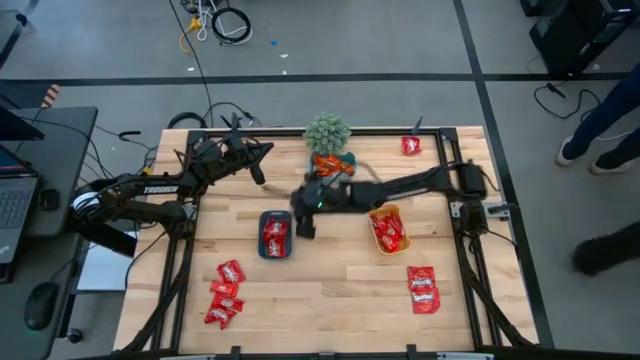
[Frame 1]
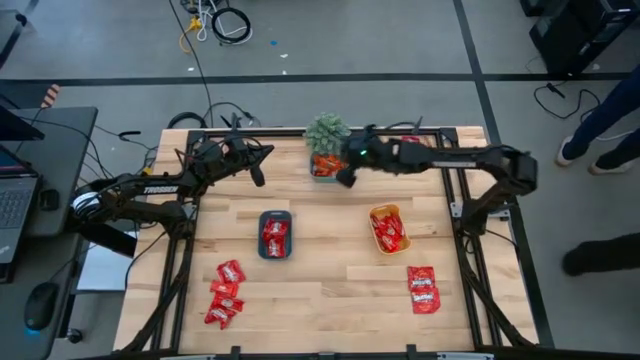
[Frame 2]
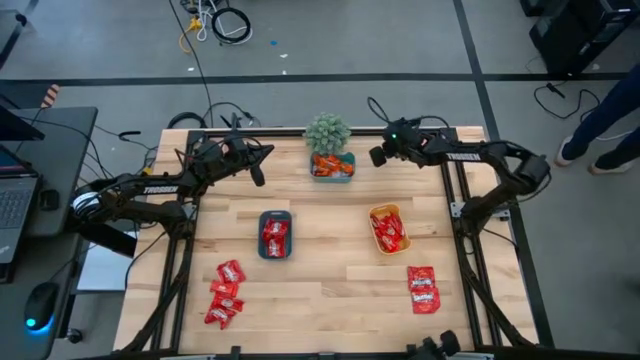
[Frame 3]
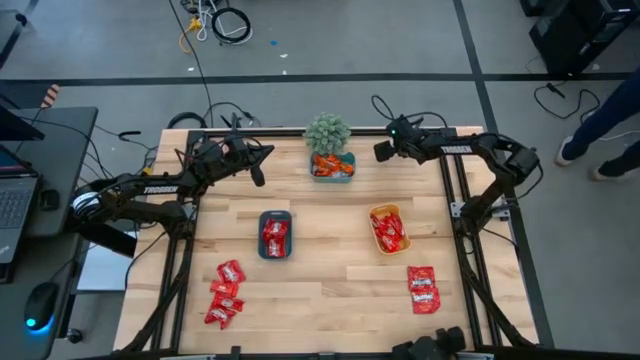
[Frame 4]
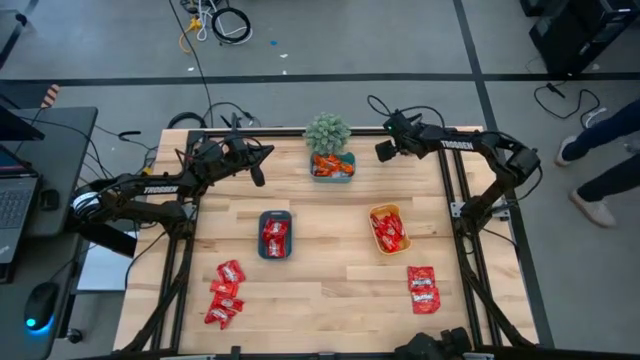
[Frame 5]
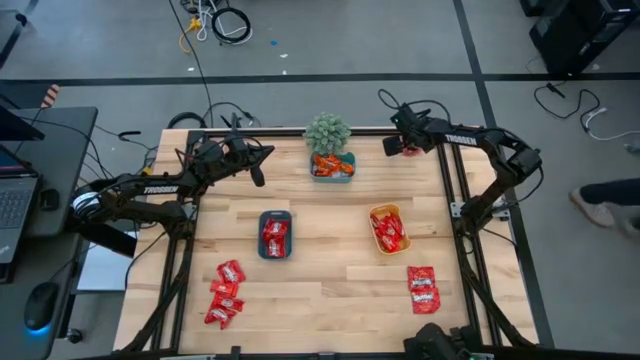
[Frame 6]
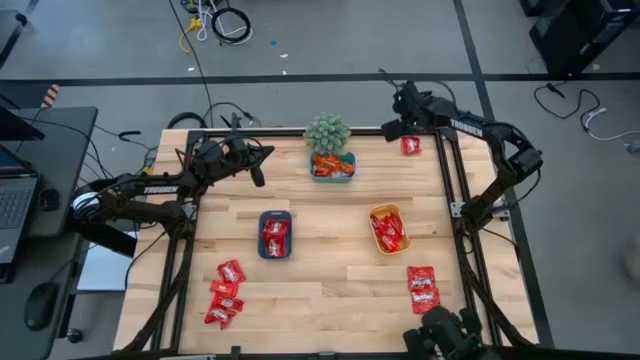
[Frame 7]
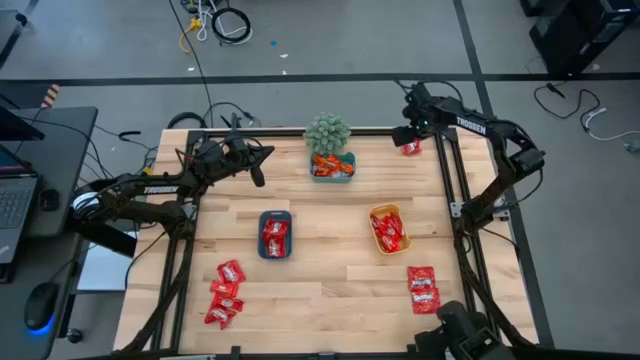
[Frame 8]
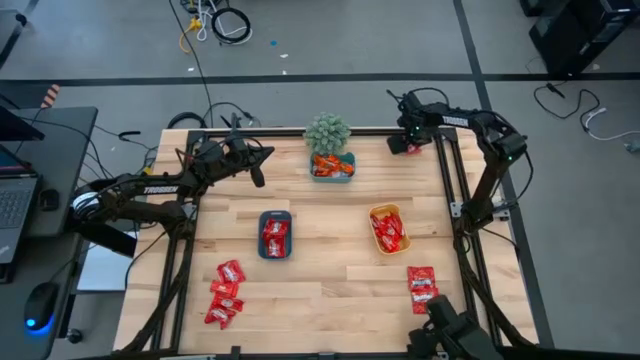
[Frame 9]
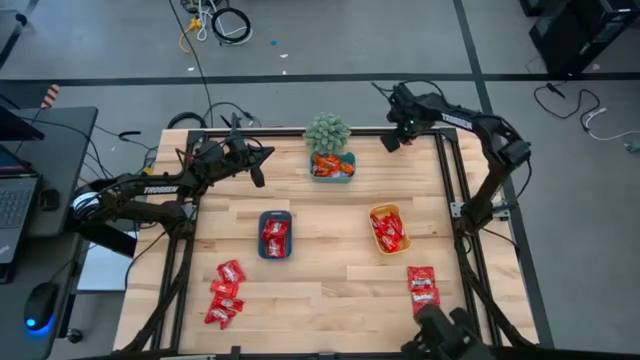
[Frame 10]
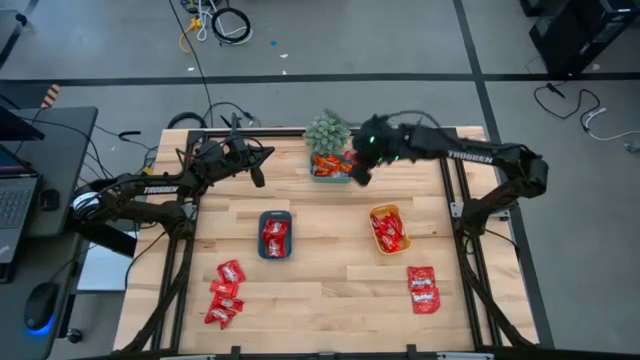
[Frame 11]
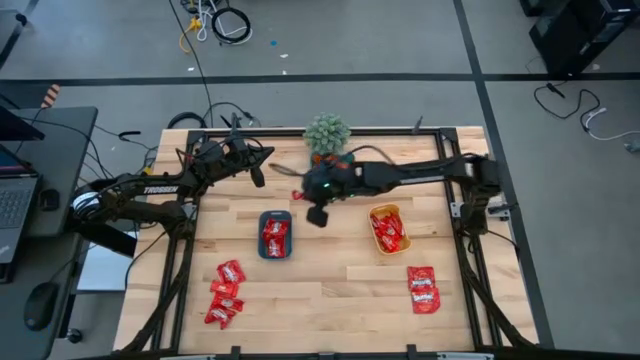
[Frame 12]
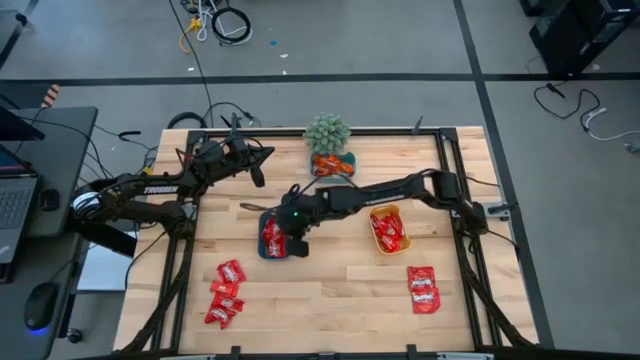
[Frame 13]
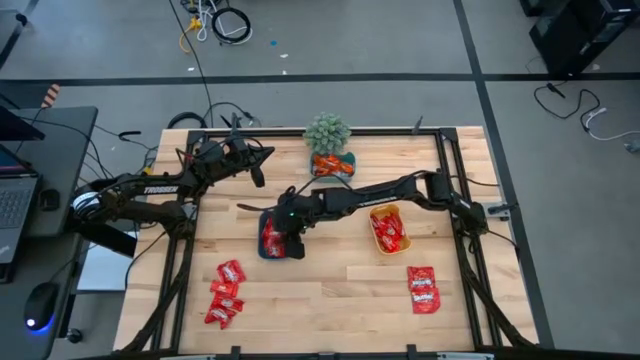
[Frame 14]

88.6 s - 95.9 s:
Task: Sort candy
Put the red candy into the blue bin

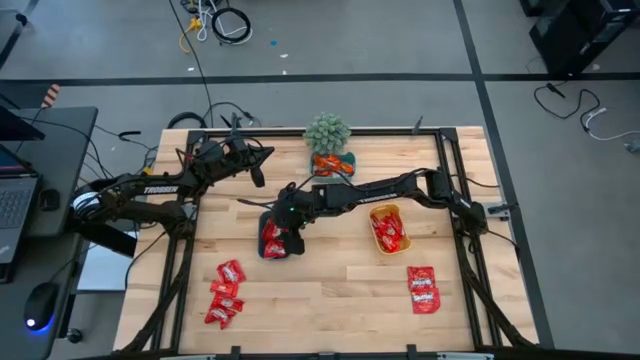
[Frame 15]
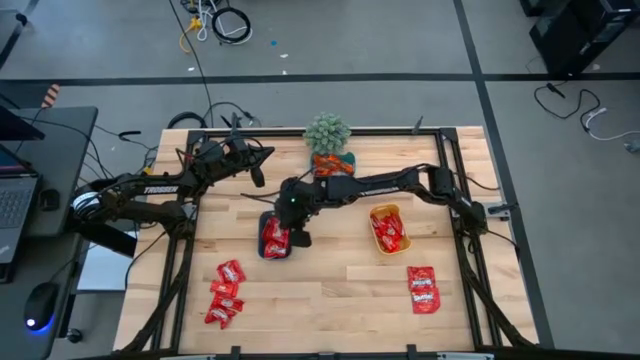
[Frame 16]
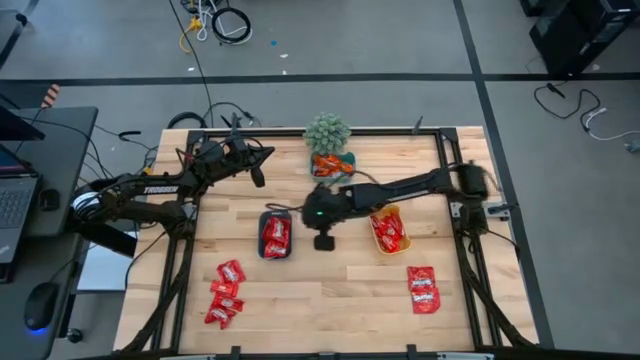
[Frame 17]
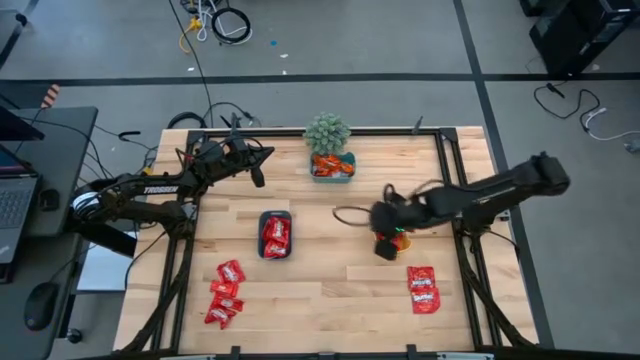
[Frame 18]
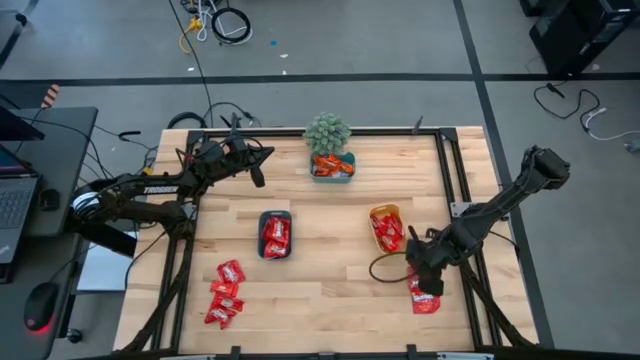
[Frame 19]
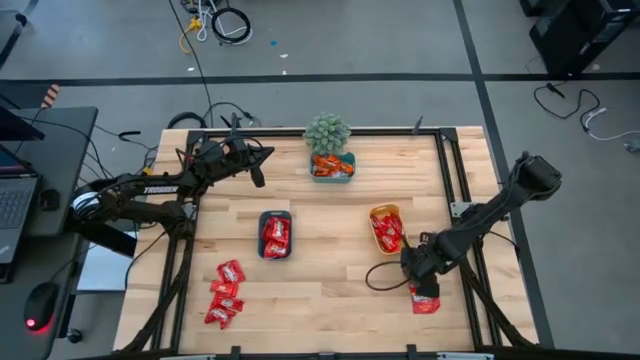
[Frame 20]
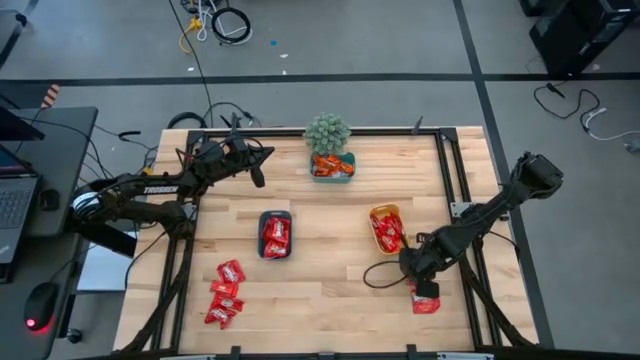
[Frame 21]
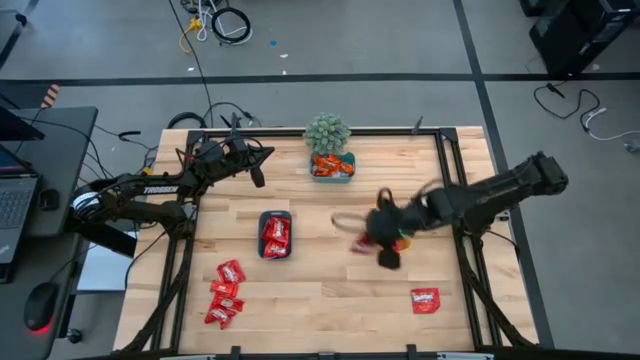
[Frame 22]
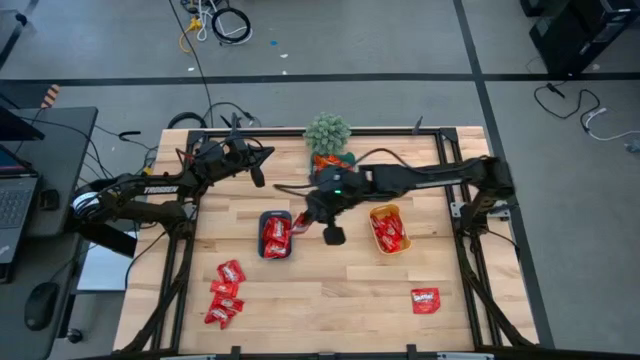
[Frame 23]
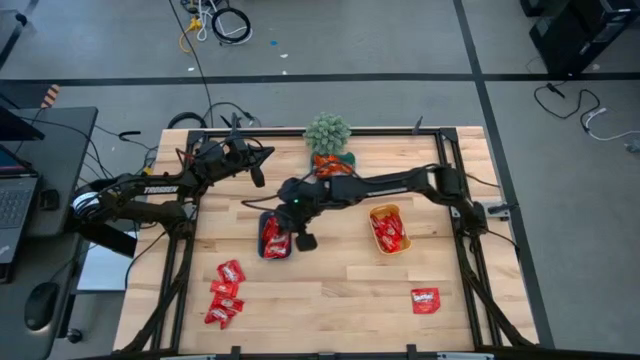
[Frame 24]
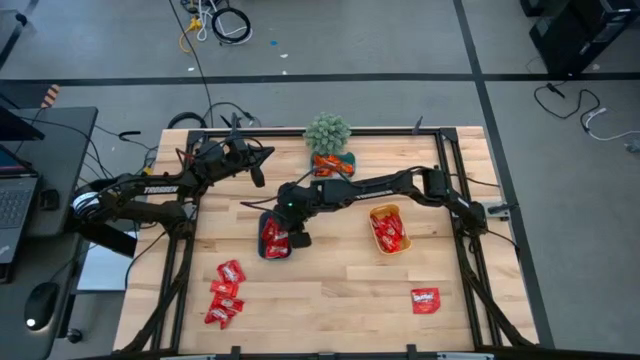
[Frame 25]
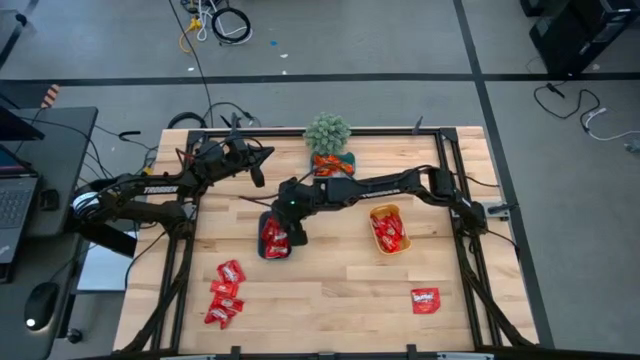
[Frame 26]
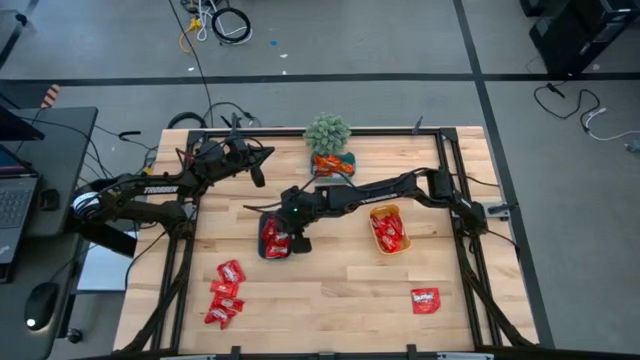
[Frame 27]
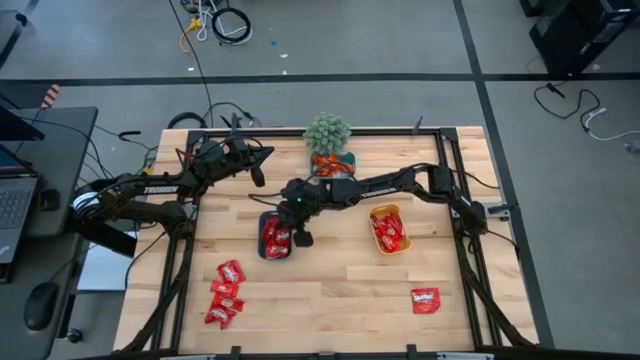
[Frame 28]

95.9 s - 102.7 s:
Put the red candy into the blue bin

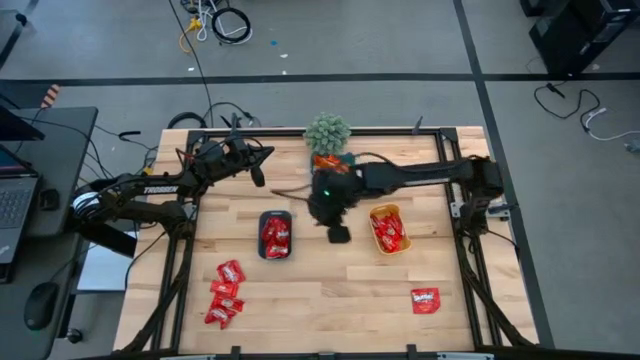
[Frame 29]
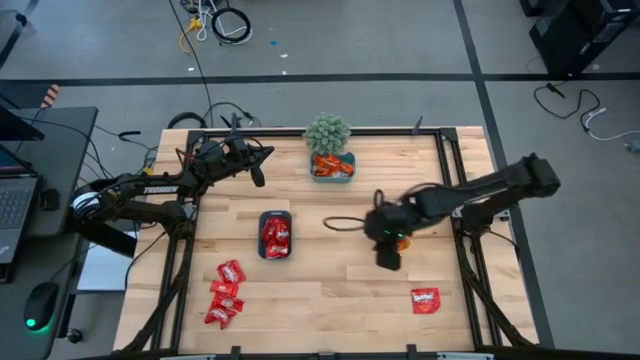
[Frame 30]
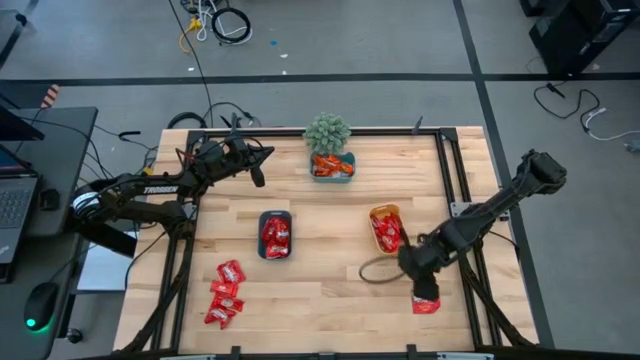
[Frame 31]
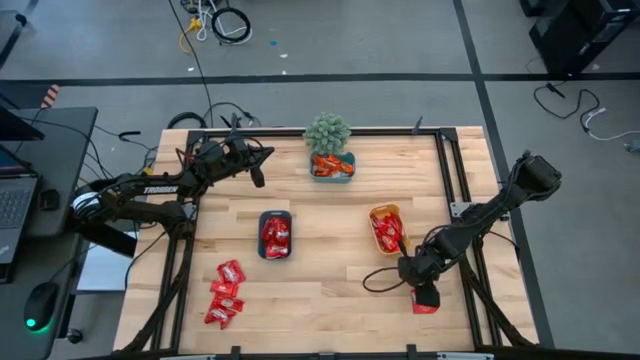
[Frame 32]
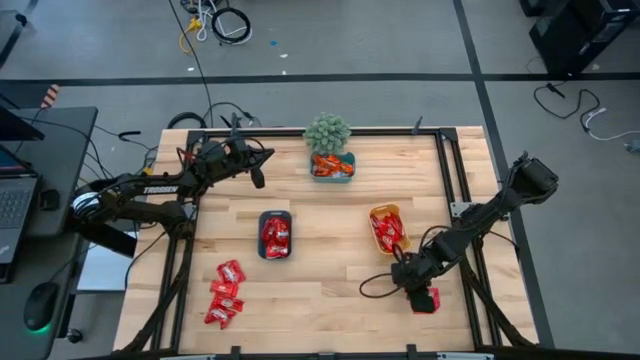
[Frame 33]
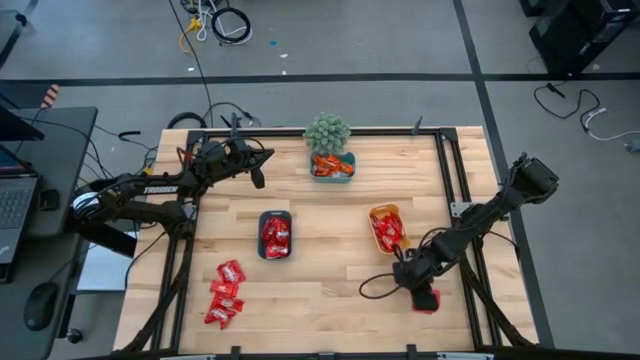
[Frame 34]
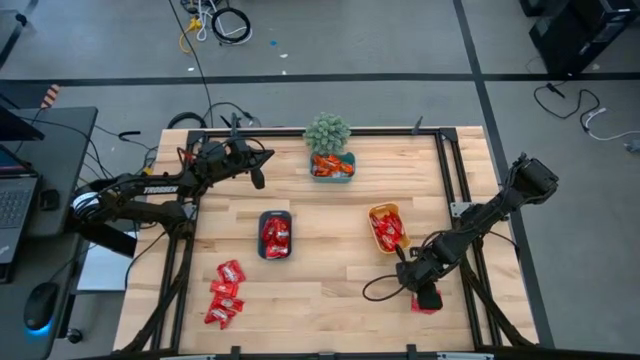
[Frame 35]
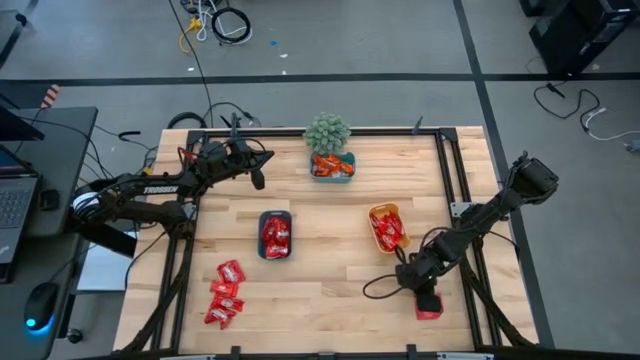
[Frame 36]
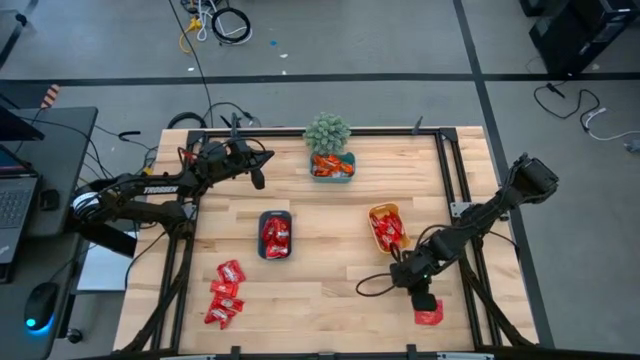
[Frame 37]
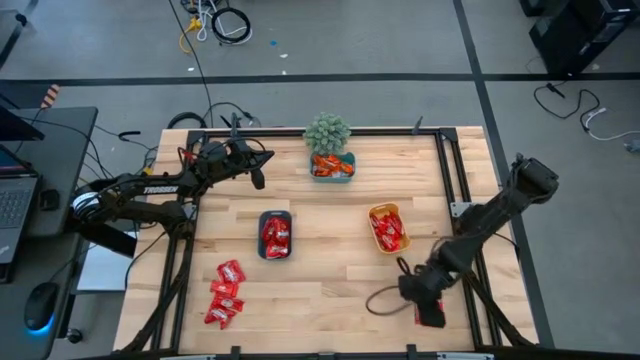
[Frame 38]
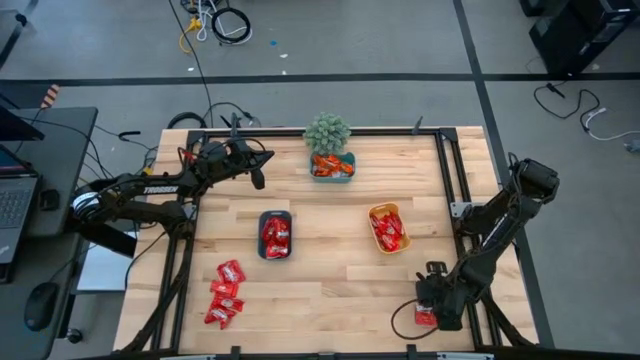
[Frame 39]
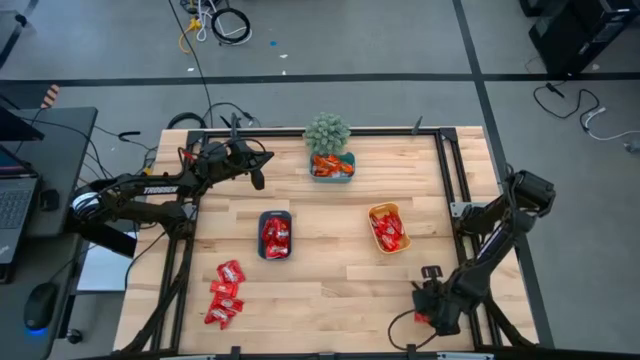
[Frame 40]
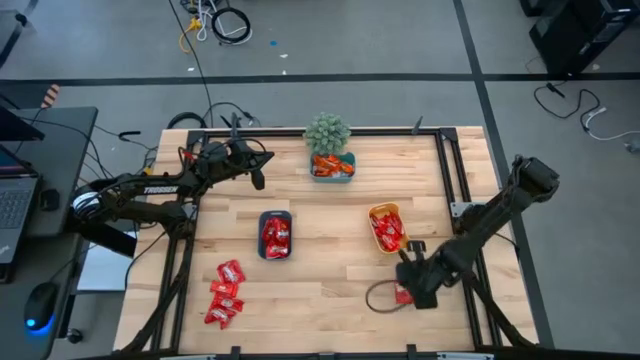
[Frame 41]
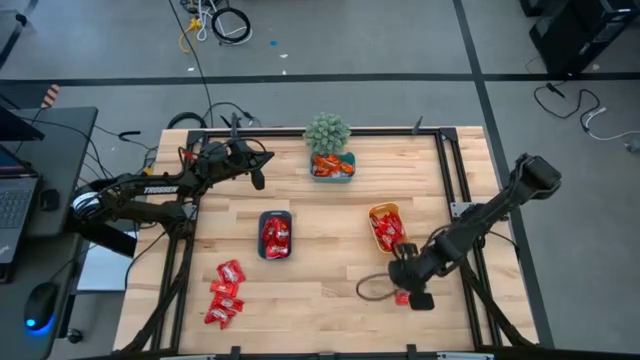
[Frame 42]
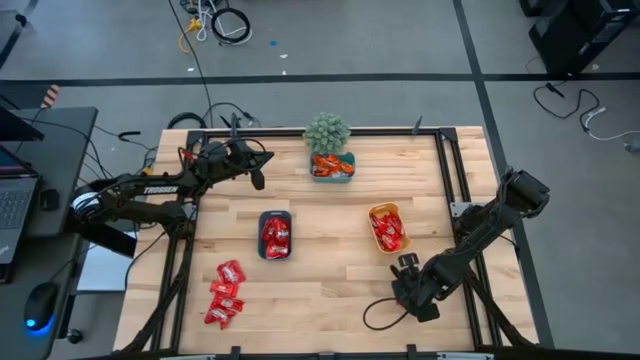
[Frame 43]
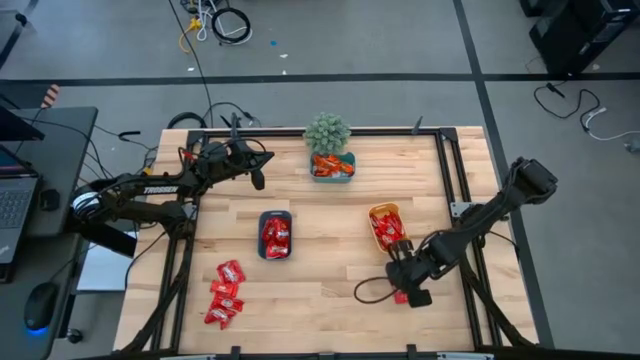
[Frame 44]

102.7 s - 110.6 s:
Put the red candy into the blue bin
